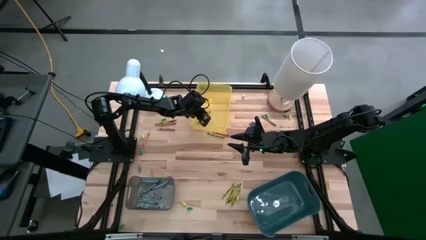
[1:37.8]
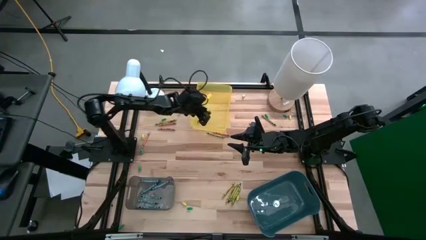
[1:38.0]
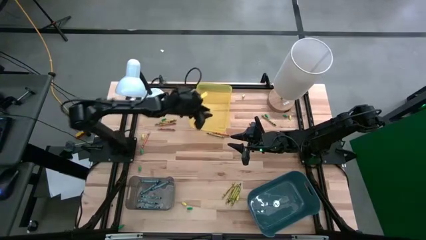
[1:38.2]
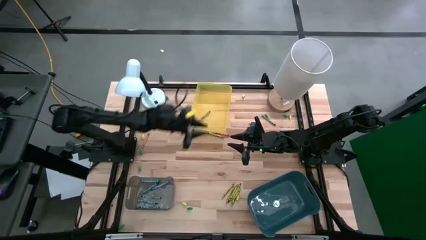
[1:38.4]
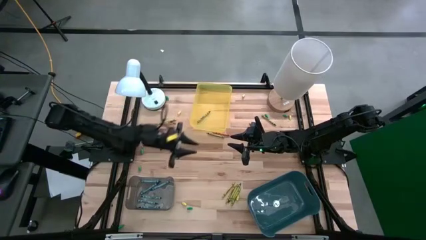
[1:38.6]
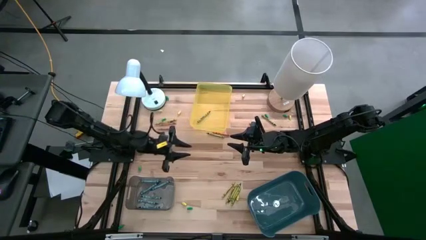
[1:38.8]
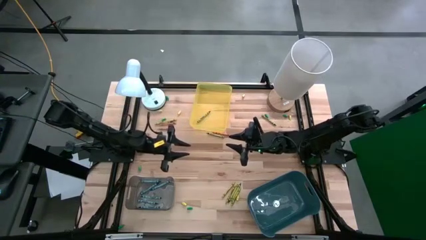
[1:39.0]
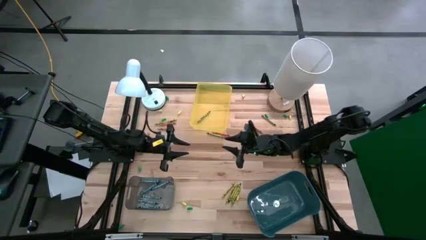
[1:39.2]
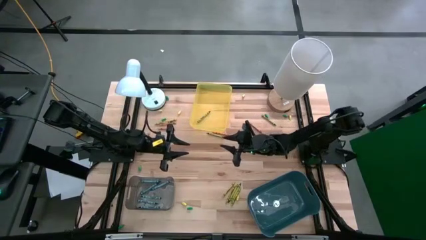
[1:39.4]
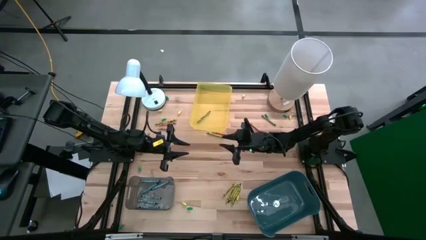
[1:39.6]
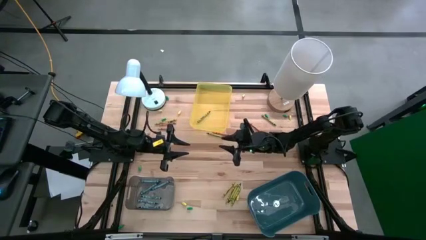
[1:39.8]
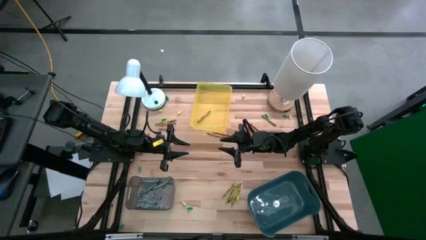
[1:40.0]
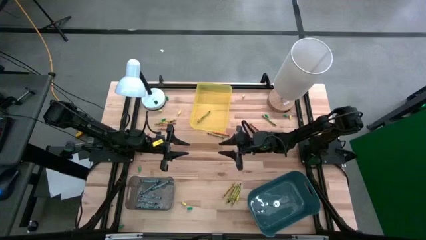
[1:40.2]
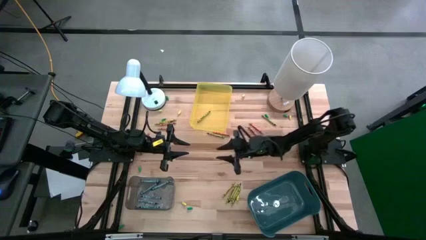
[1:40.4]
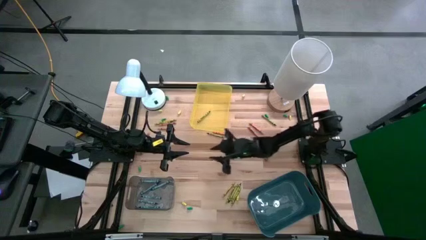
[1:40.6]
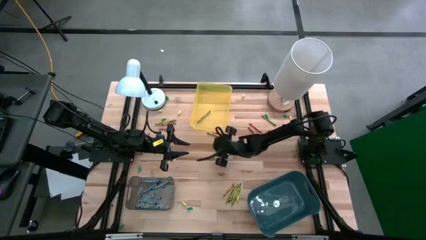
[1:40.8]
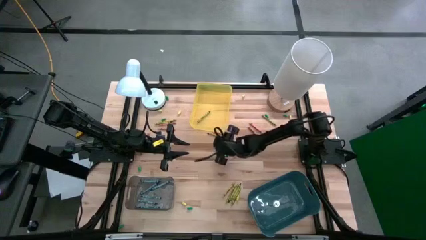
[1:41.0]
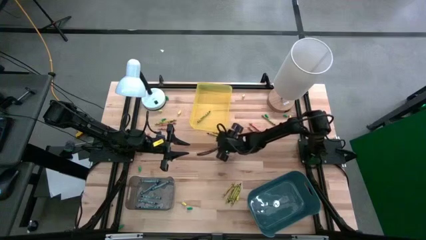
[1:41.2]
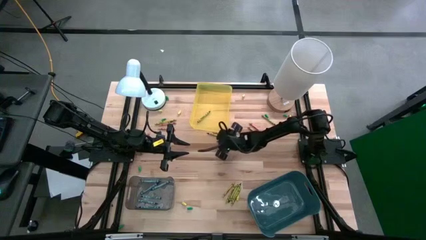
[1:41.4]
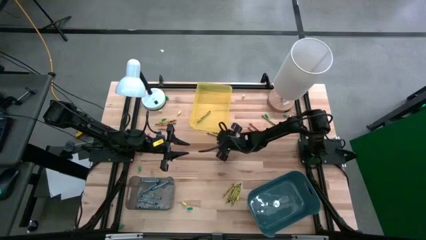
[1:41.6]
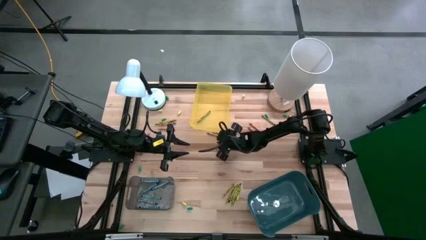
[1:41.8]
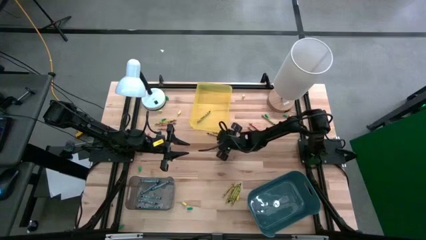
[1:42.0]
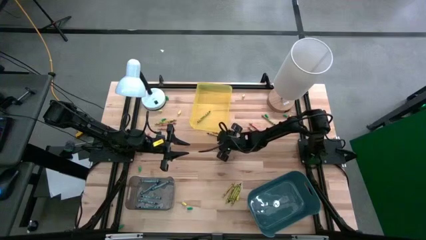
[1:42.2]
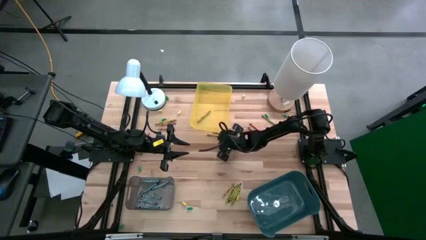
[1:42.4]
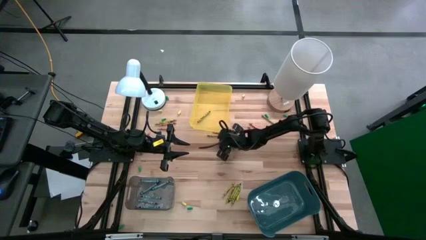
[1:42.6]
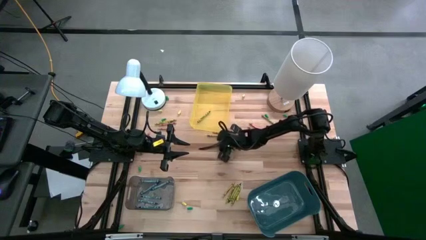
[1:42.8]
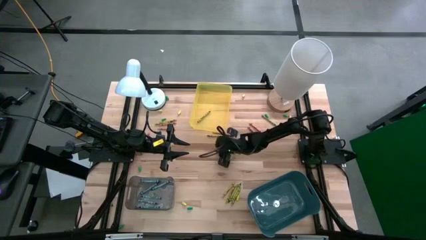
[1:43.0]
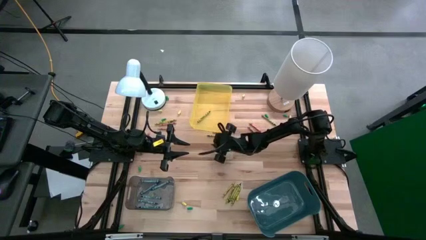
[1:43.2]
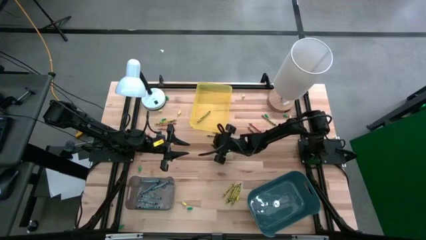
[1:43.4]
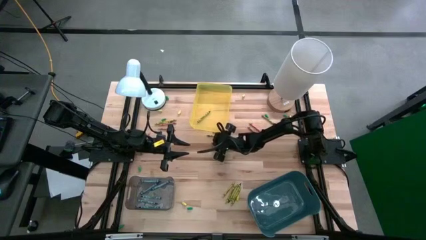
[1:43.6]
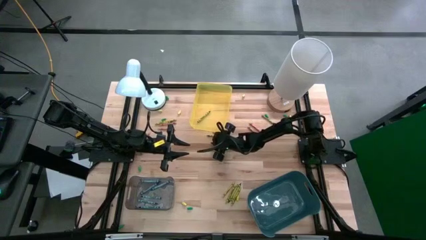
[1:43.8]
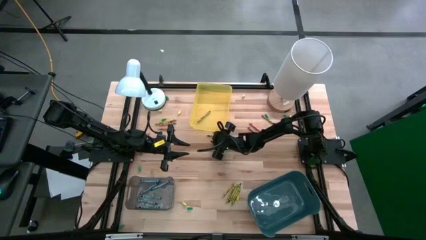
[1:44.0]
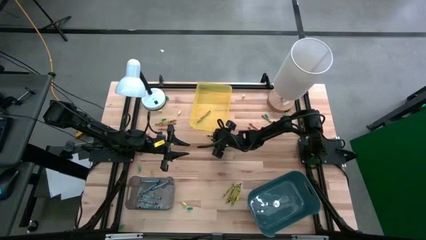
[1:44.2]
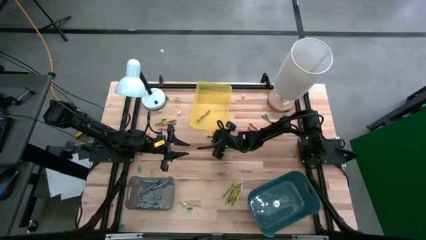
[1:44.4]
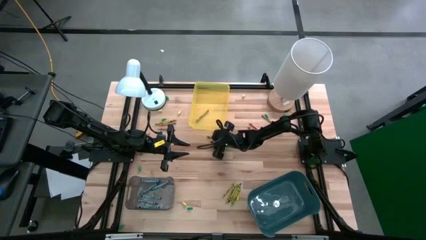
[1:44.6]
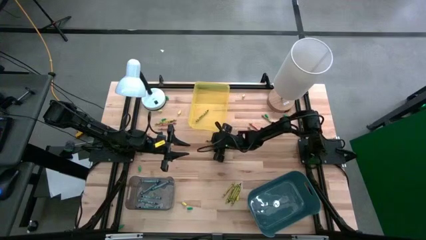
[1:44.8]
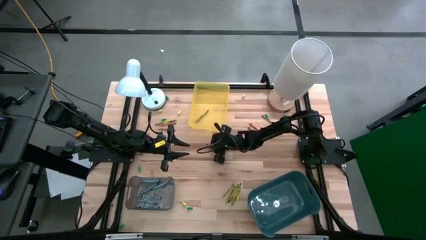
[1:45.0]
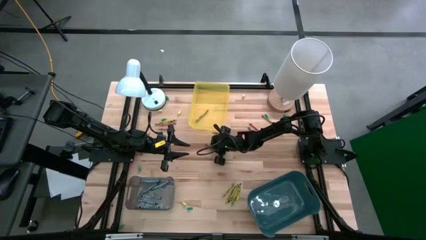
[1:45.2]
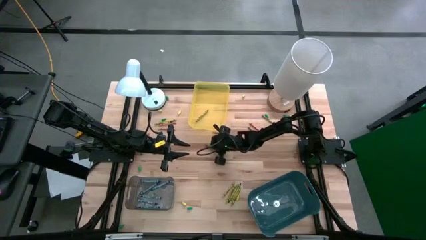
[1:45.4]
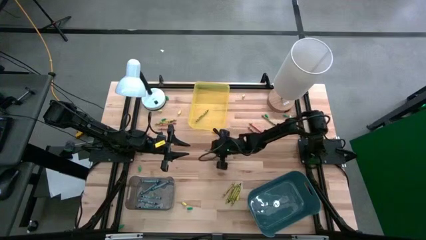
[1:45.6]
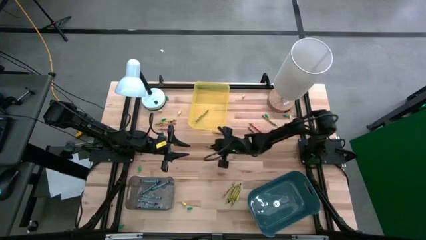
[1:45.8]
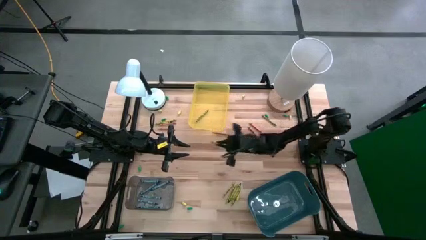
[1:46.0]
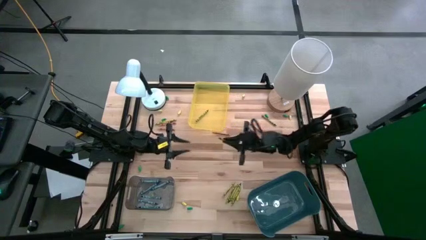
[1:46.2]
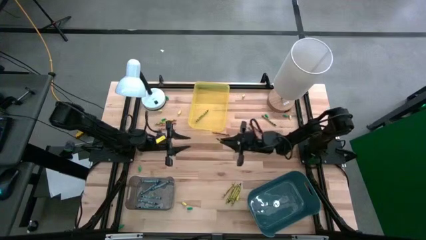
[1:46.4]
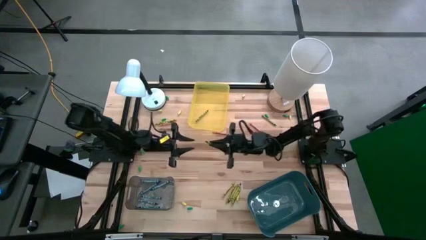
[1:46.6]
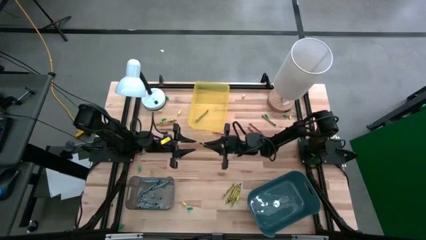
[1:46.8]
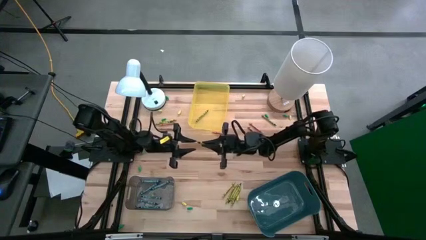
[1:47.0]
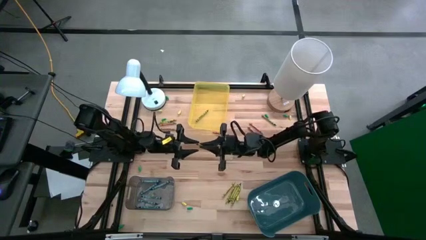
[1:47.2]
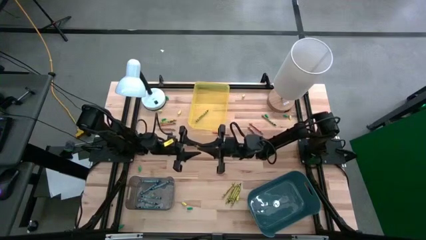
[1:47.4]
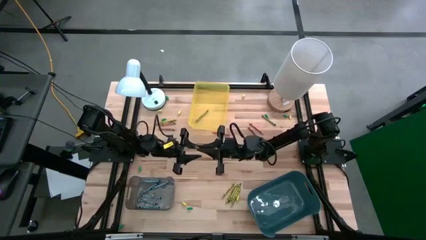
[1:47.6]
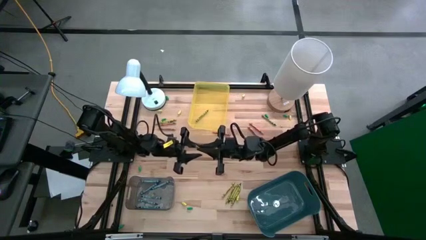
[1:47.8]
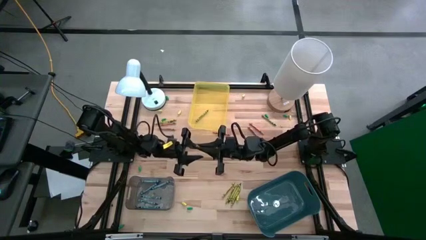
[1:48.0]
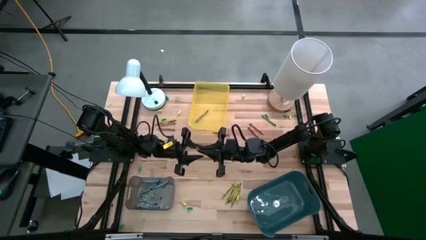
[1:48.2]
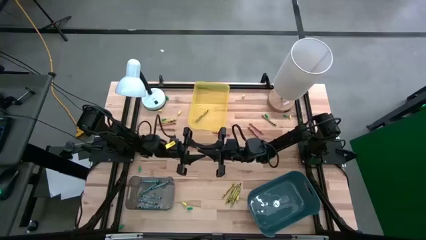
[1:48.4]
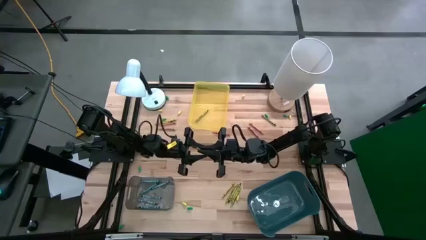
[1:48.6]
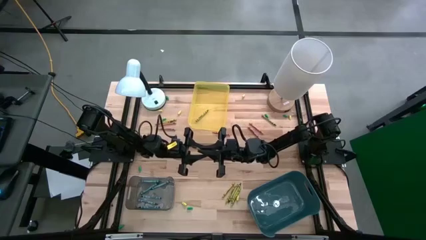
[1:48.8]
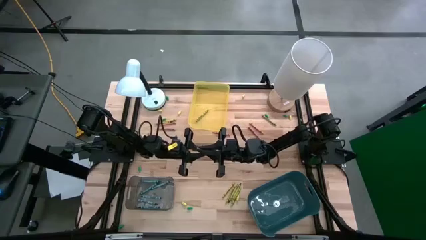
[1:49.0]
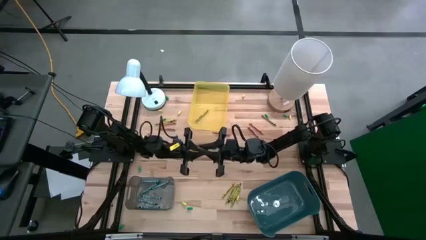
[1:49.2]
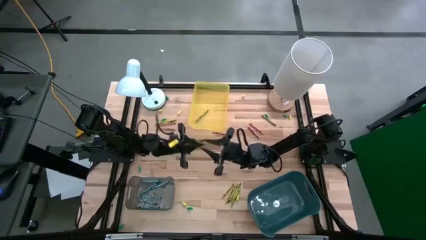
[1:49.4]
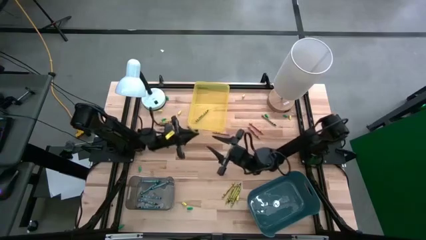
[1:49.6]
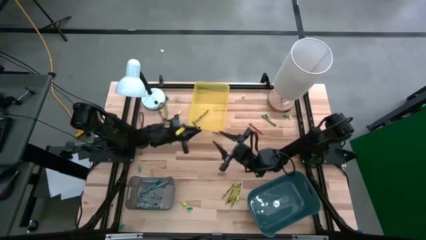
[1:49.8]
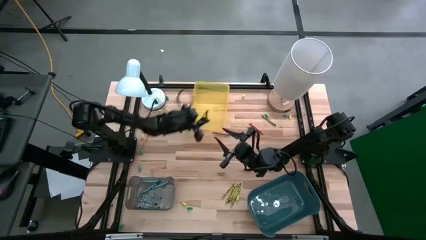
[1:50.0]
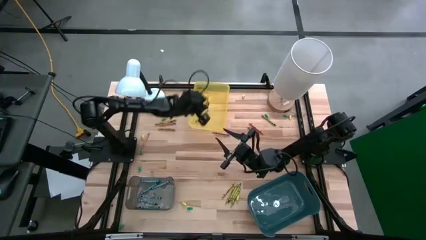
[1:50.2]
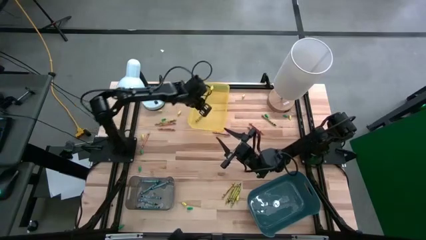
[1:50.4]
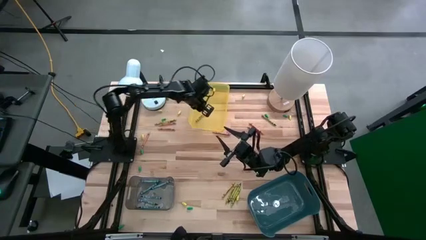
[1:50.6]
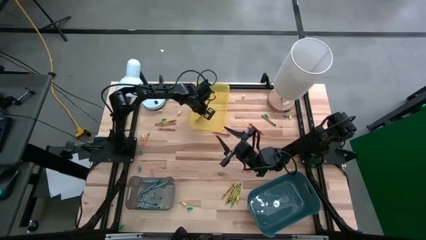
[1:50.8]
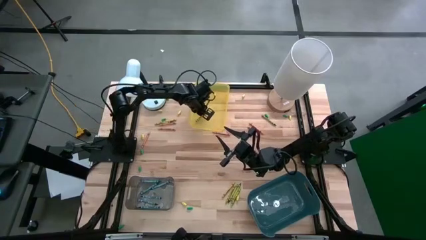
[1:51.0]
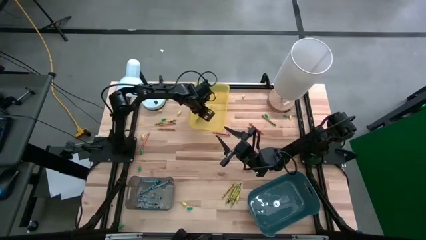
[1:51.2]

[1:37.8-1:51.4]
Task: Sort crayons
Put the green crayon into the yellow bin
